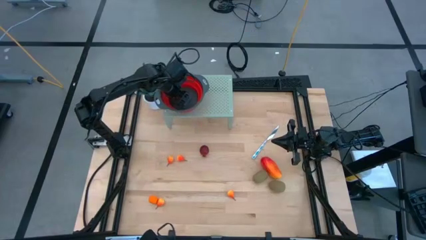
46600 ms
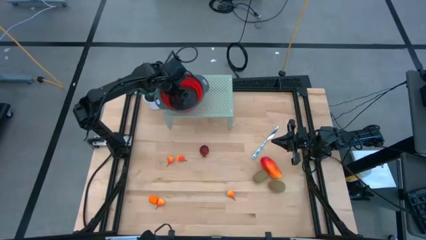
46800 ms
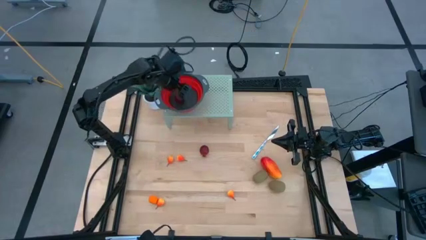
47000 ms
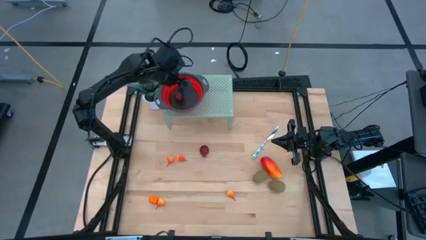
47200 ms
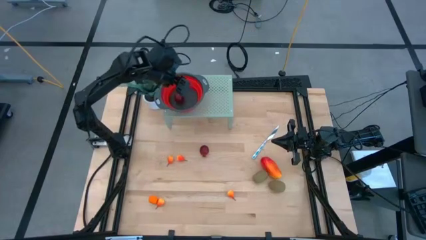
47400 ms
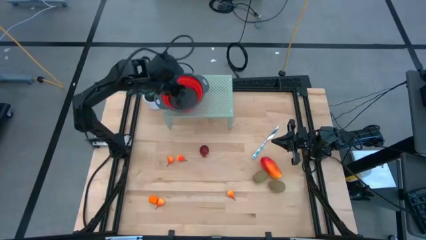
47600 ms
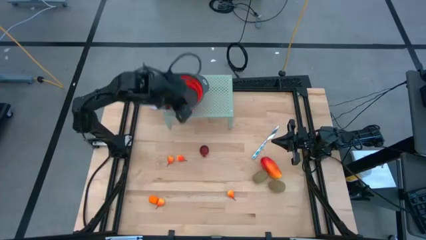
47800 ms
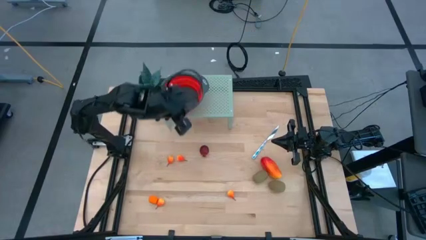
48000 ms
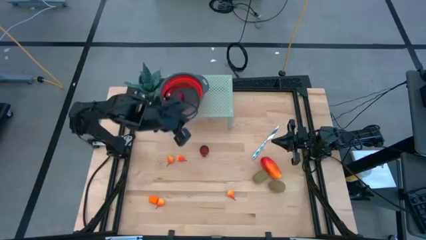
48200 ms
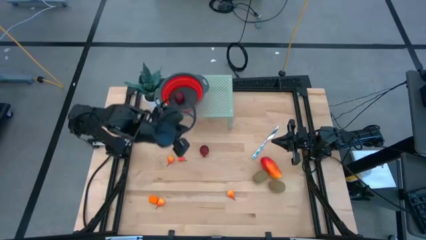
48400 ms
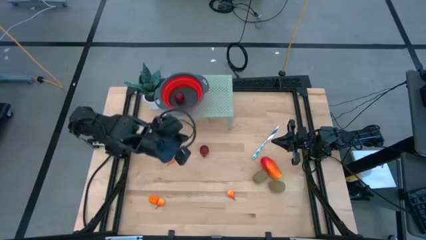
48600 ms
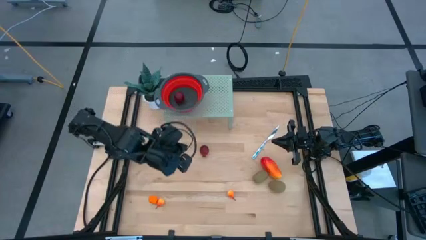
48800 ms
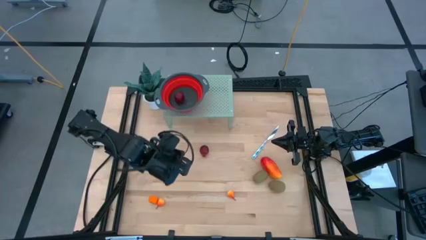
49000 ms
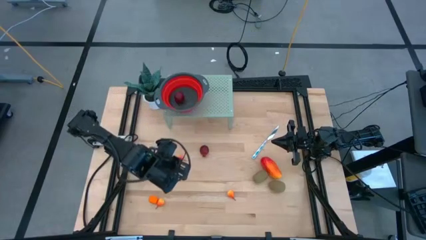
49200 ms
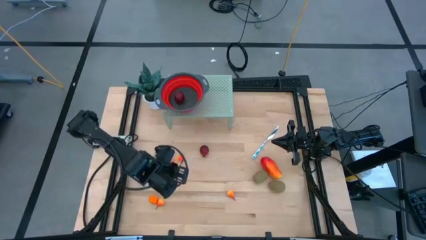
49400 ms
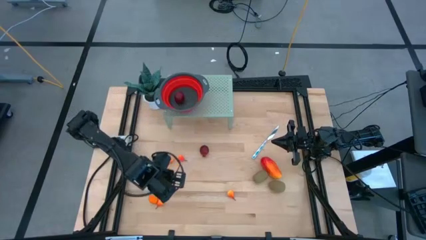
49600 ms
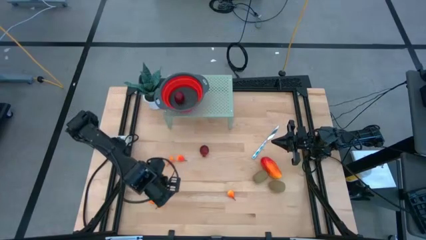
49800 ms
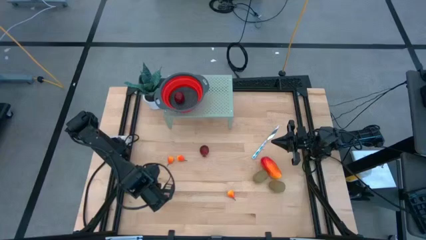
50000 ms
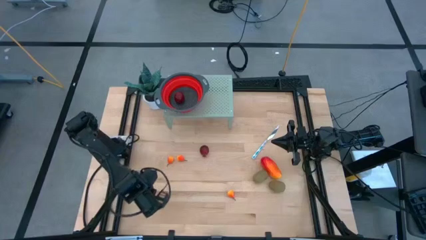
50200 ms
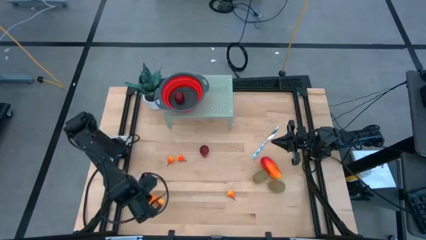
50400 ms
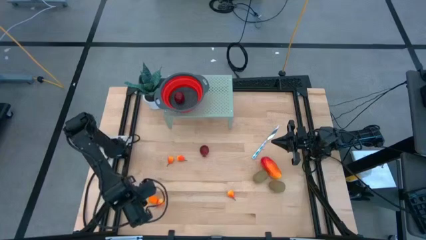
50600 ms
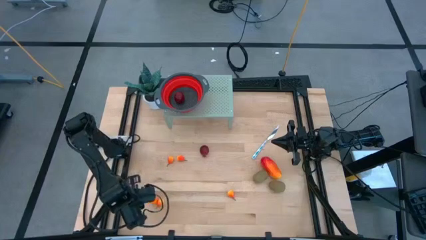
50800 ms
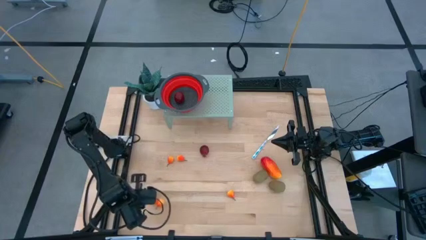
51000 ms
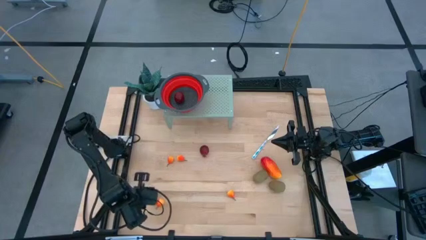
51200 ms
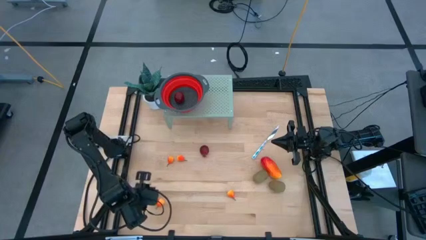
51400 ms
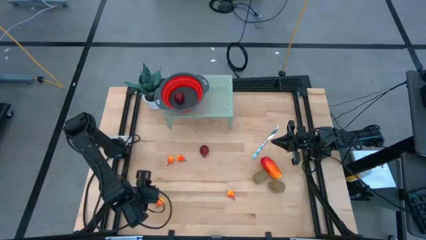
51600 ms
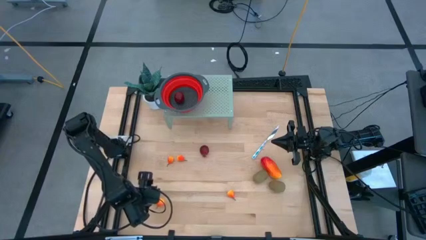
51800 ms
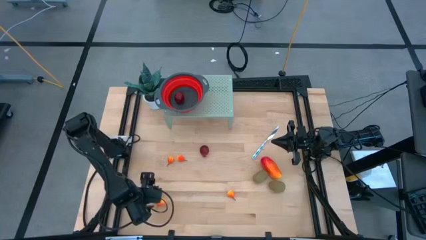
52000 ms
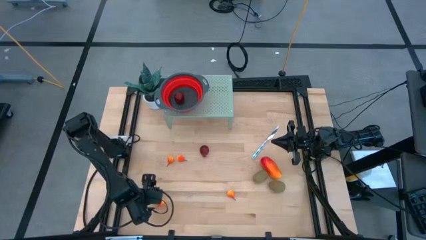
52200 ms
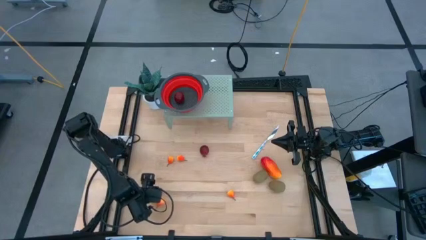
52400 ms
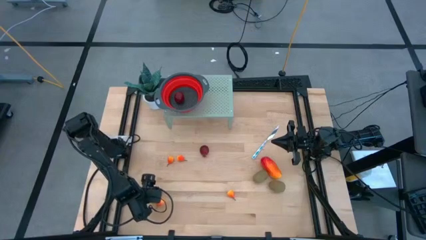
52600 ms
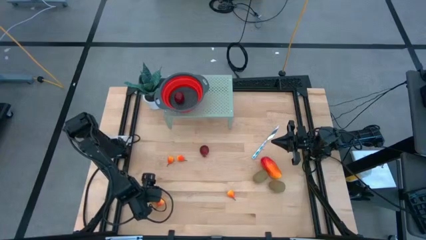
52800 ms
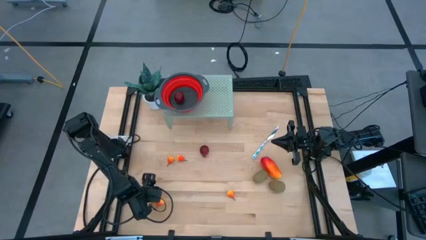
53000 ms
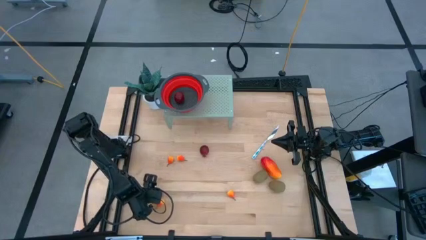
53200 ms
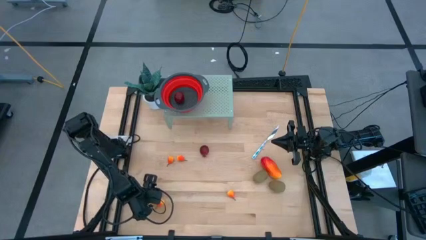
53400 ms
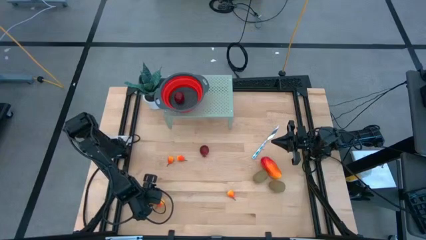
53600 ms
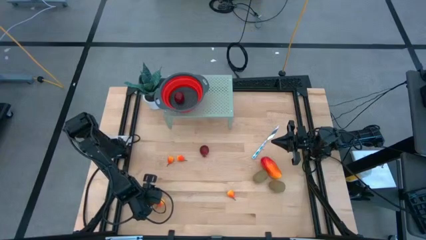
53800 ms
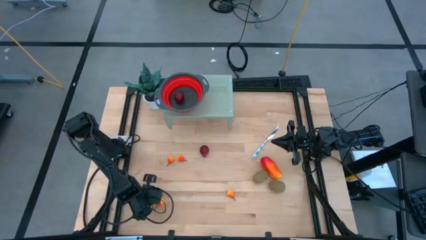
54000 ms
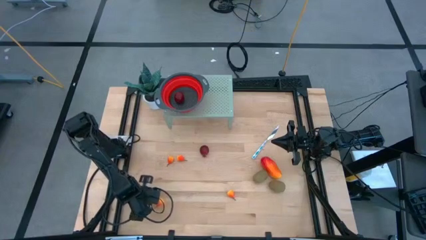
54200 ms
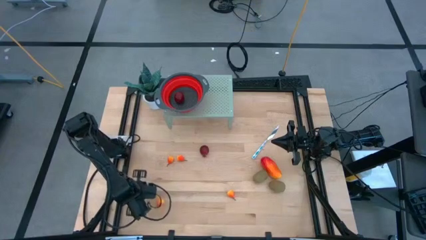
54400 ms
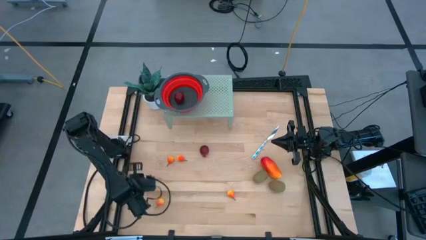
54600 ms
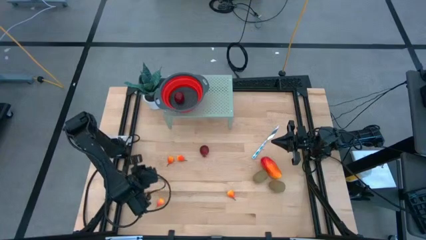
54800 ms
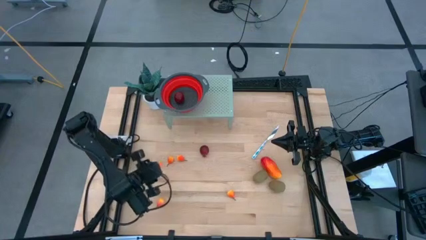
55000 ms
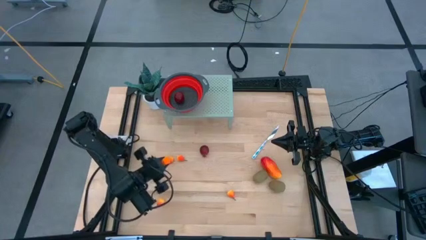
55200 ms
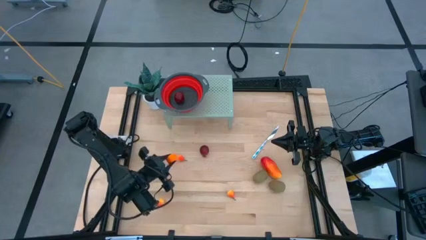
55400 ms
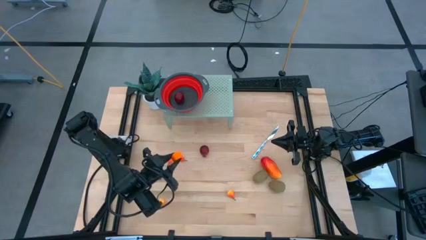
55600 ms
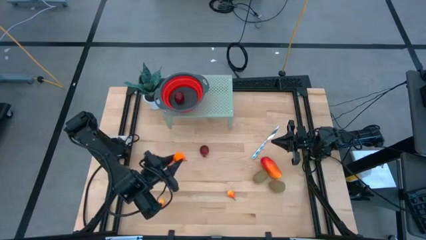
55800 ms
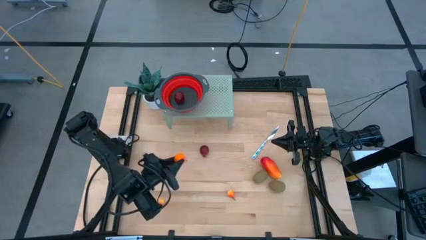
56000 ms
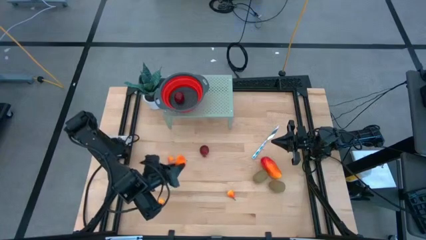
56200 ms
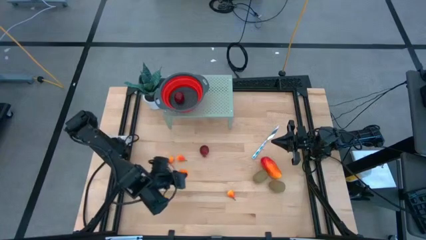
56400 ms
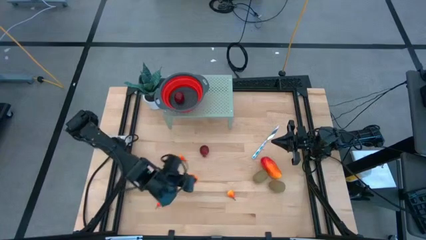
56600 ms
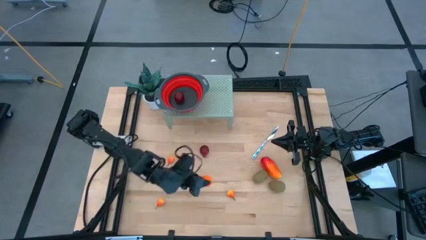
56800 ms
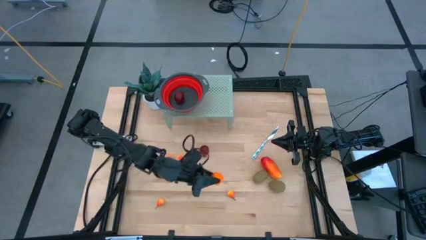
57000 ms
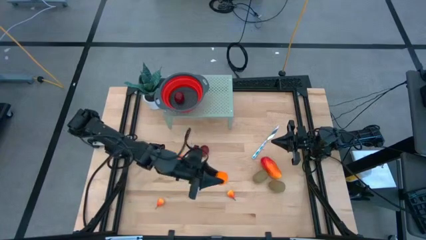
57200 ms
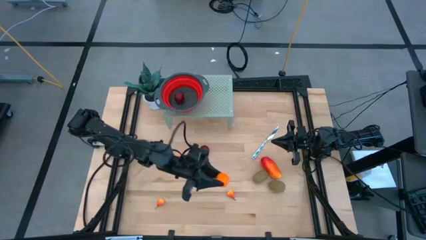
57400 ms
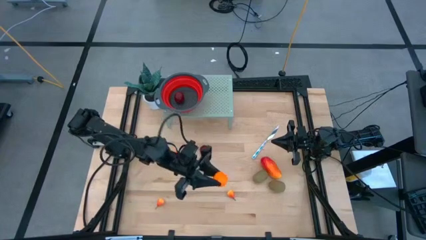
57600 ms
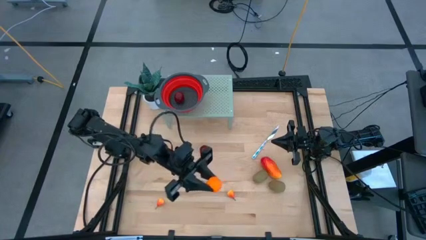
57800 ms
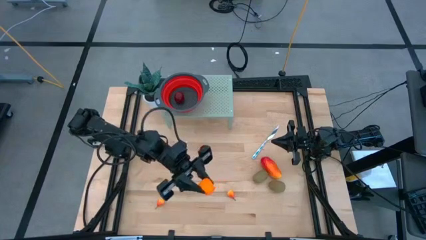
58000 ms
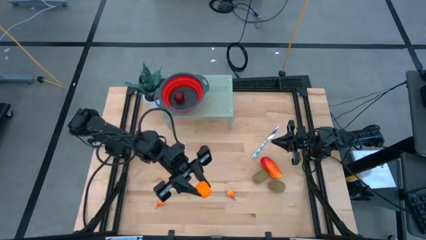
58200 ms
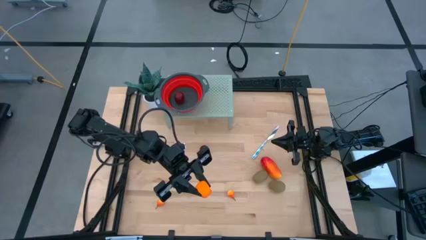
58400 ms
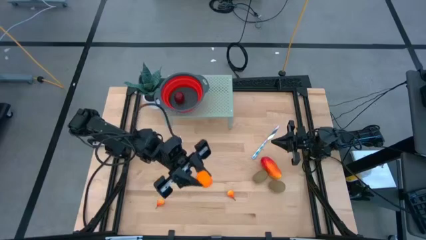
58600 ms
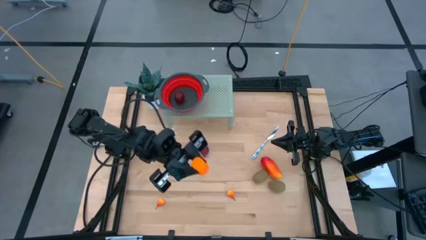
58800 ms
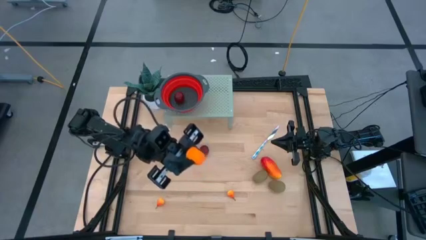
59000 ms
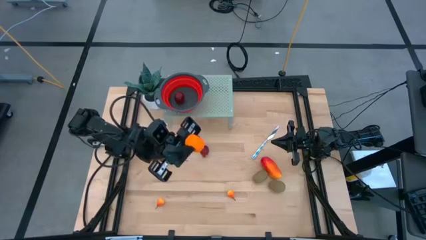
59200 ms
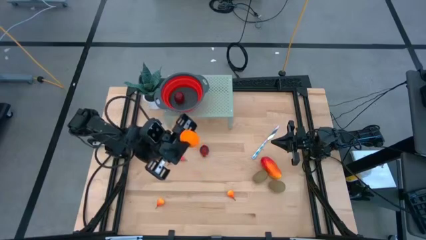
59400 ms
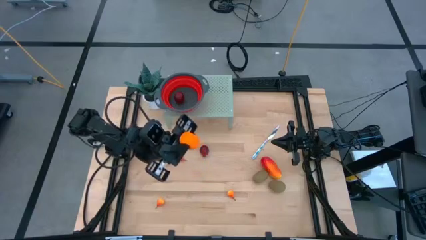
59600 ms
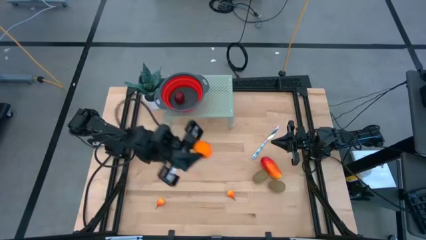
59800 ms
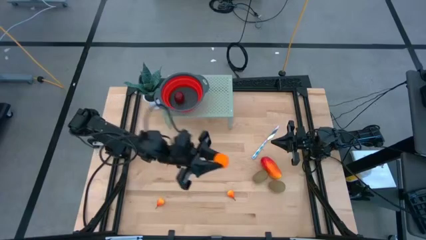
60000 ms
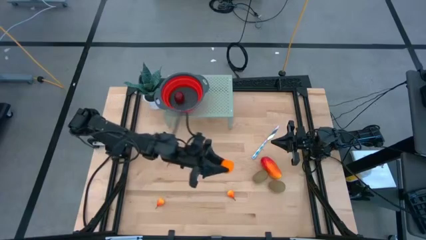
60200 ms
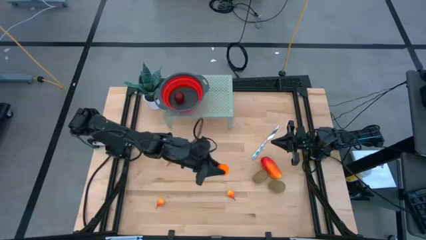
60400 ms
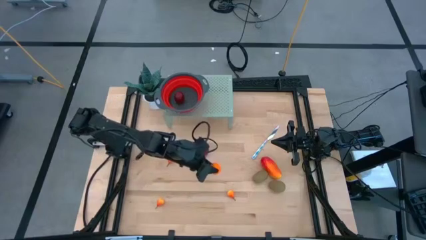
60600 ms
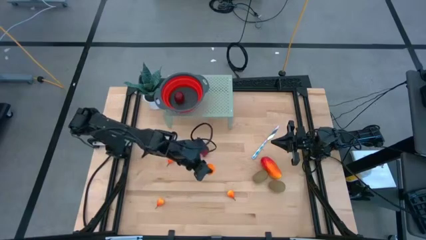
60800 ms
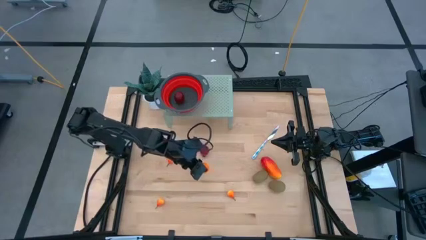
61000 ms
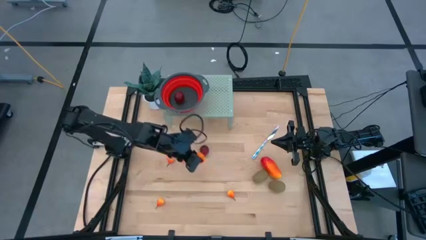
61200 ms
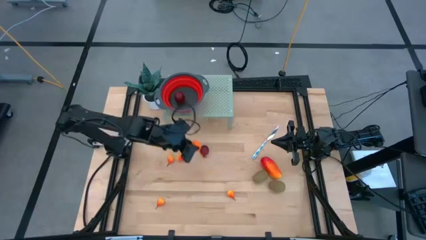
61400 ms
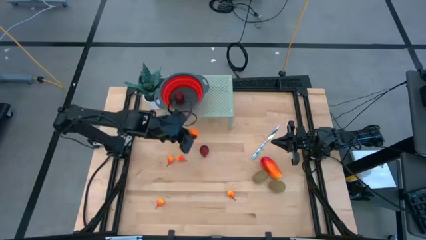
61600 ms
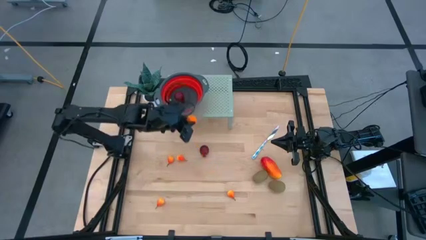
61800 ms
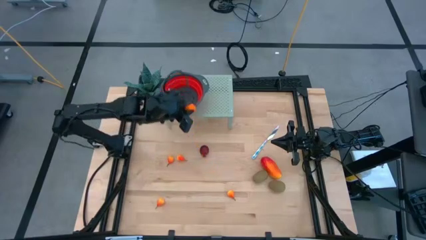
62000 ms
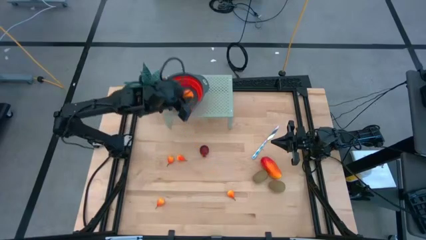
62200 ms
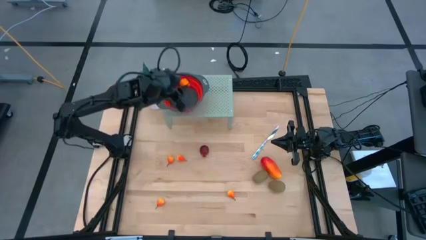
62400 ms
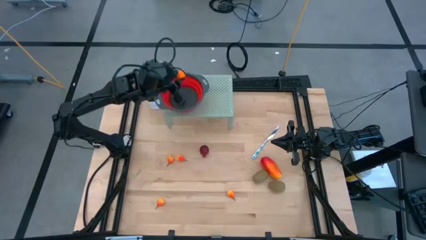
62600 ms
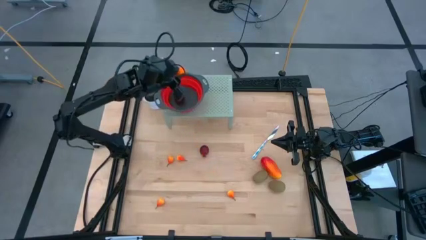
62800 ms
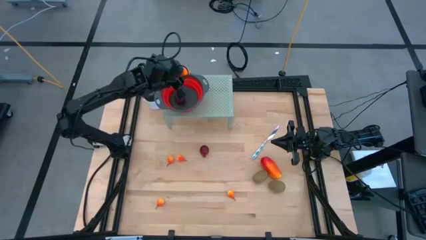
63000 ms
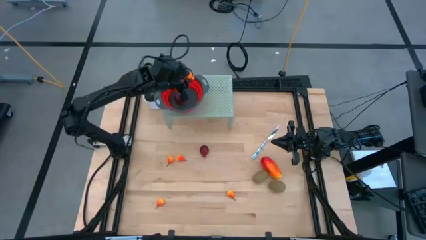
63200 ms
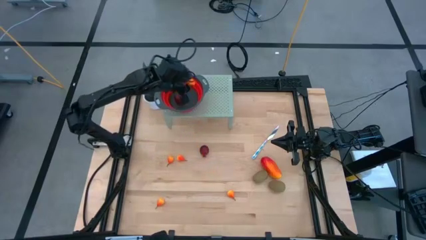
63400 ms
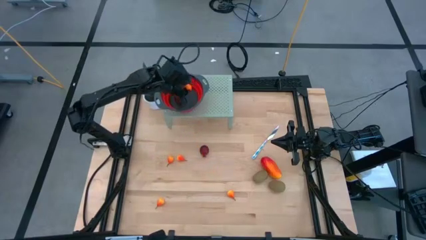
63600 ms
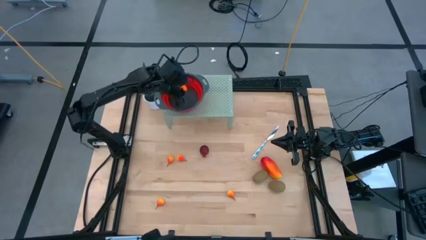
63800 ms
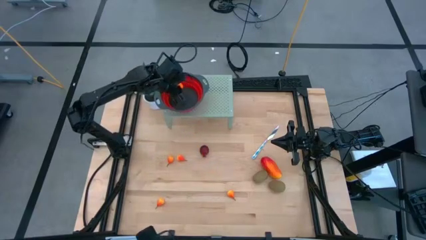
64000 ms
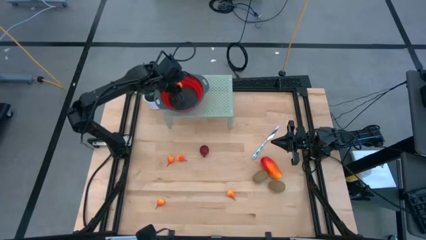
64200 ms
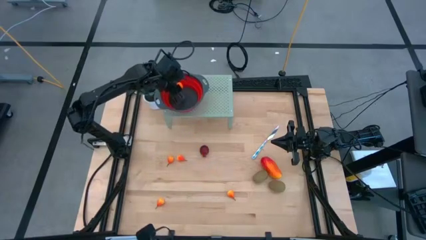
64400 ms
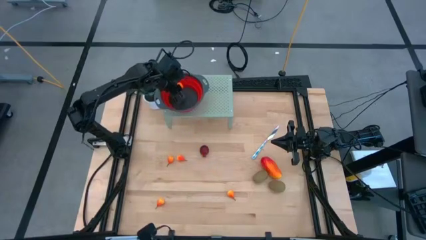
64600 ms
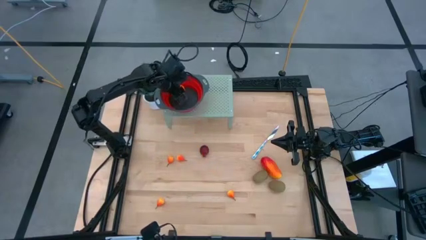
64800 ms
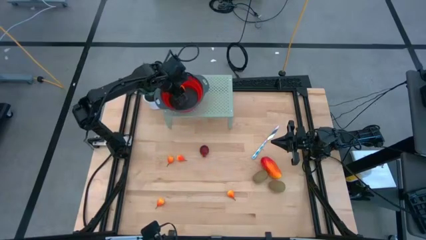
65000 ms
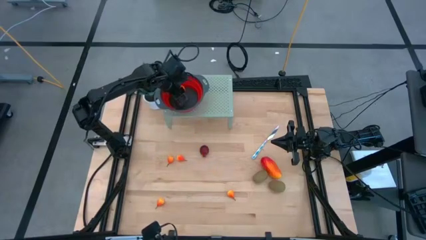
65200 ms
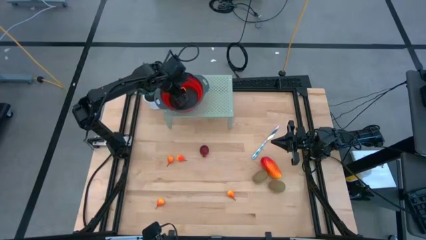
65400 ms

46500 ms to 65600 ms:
Task: Pick & Place Fruit
Put the orange into the red strainer bowl on the shelf
